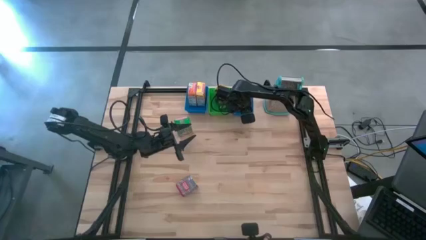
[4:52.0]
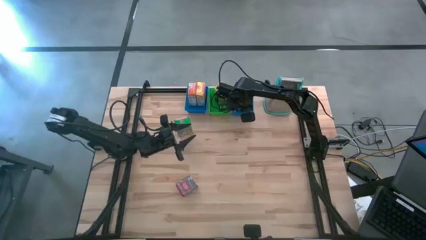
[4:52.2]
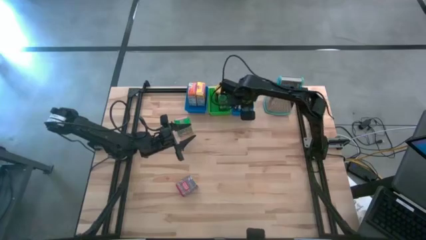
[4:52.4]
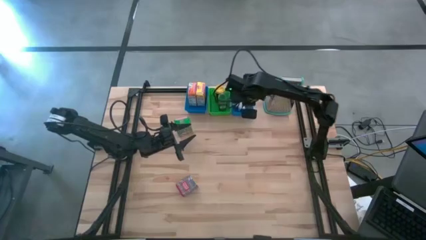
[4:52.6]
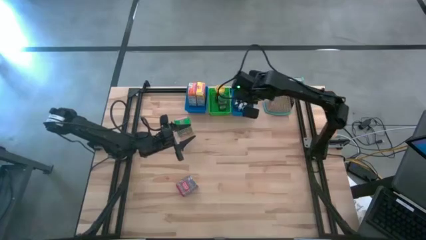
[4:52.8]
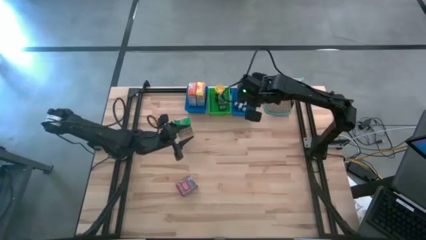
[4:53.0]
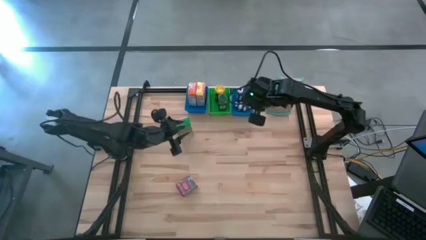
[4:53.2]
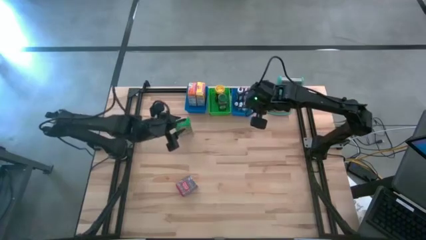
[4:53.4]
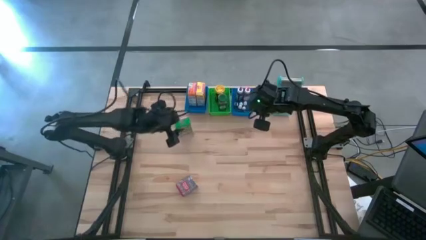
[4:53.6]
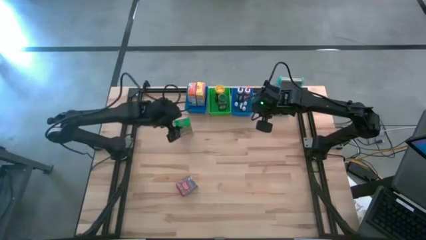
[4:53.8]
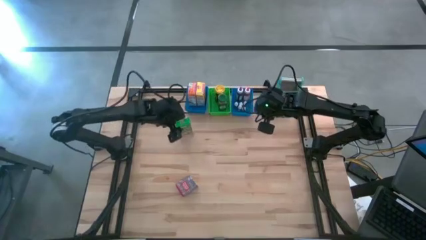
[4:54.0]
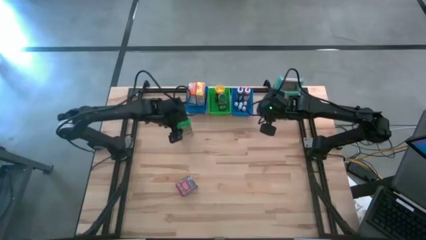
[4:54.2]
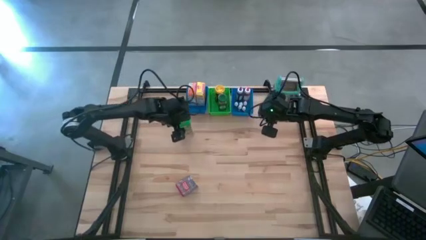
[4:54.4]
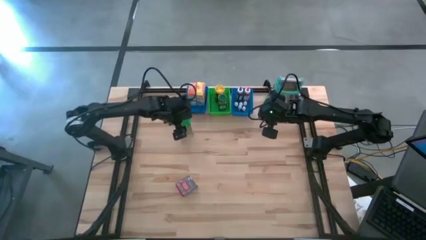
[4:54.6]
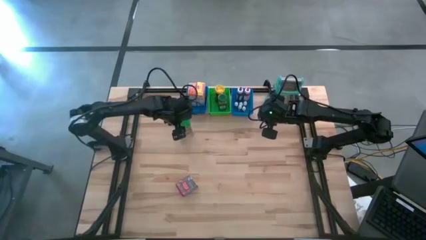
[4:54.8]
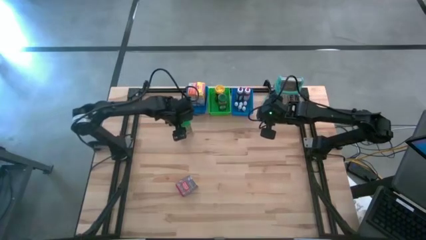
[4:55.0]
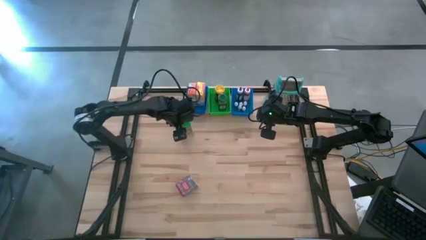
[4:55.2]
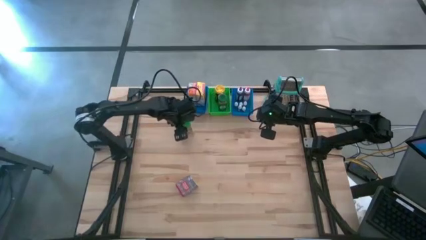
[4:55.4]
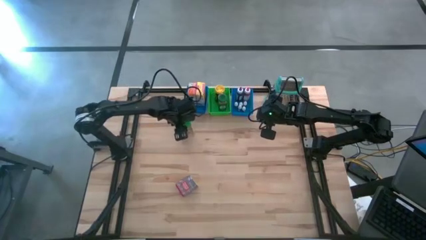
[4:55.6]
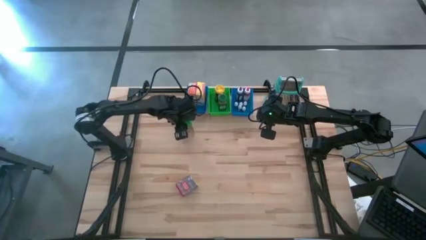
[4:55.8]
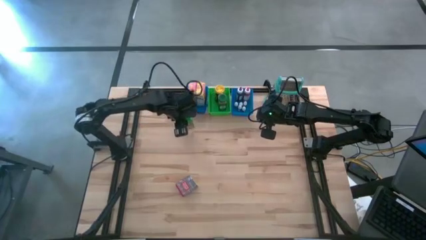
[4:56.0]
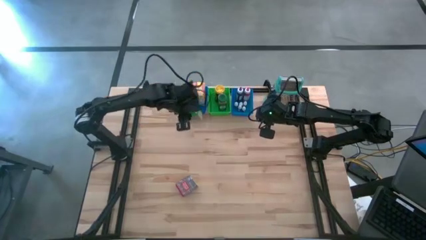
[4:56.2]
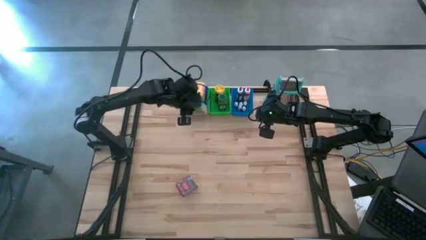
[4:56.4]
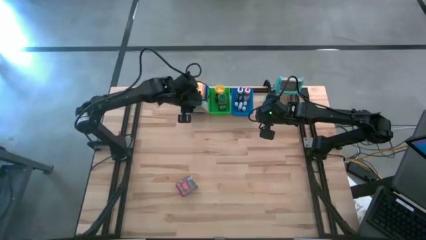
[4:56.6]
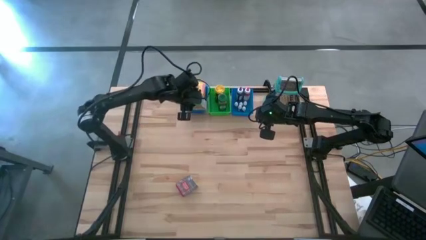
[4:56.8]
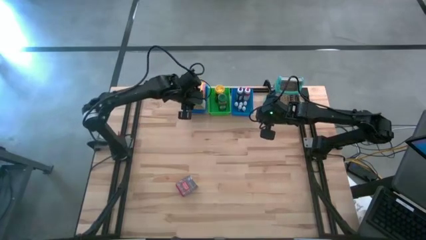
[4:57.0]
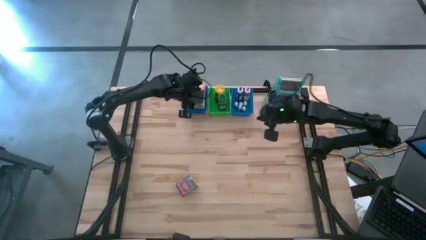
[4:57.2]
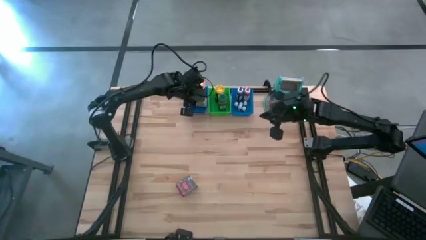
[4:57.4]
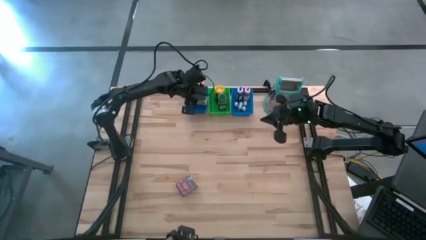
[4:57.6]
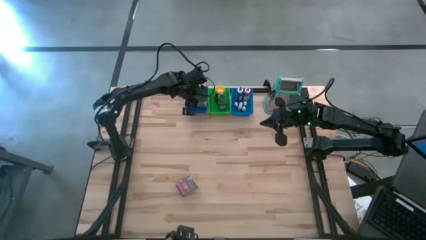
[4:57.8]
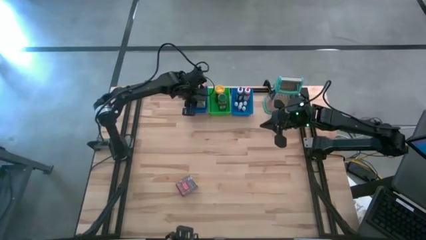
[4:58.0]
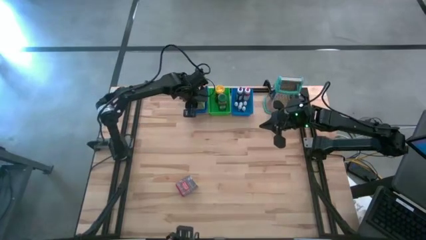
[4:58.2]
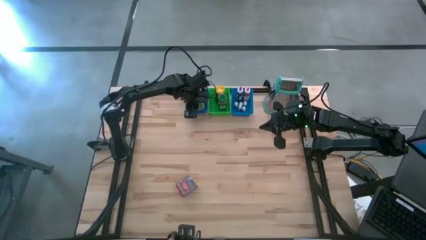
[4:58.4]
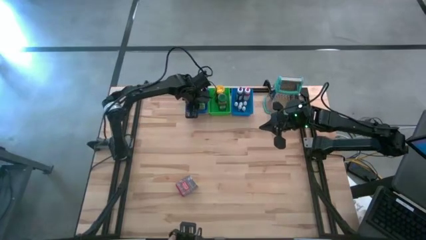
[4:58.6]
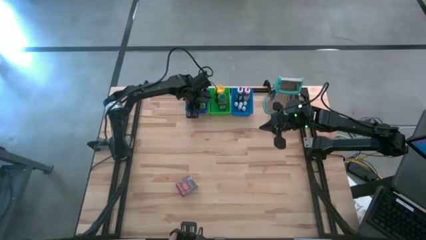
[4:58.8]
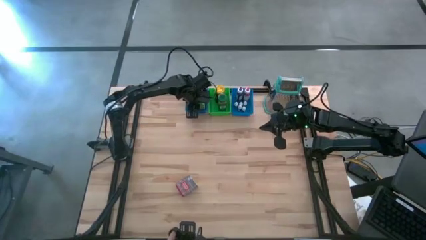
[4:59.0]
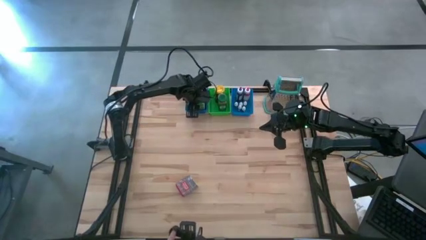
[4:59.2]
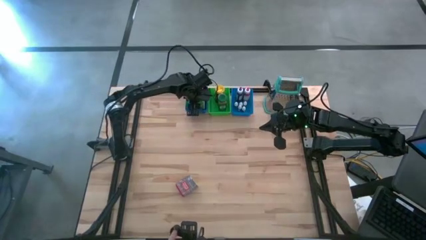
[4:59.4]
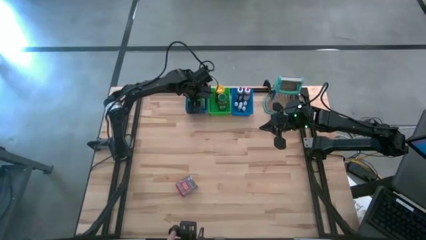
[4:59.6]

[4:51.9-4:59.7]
Task: Pick & Place Kitchen Items
Put the green cereal box into the left blue bin

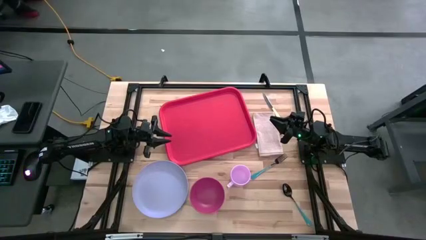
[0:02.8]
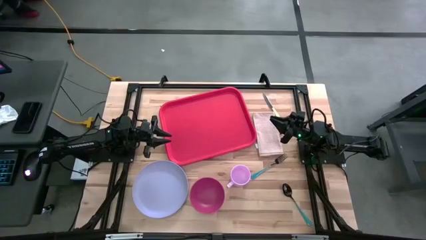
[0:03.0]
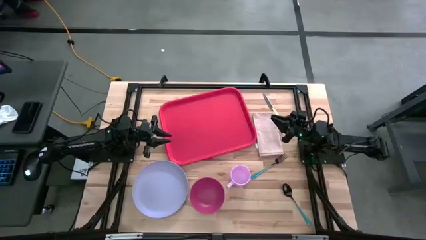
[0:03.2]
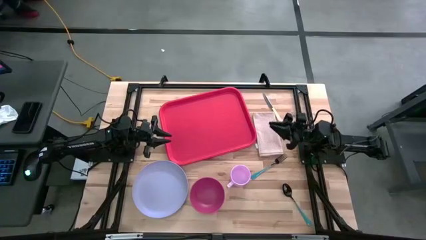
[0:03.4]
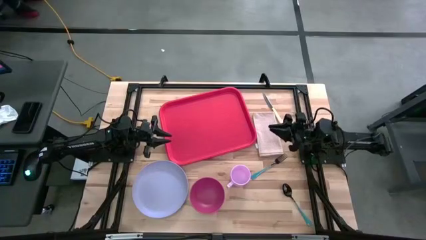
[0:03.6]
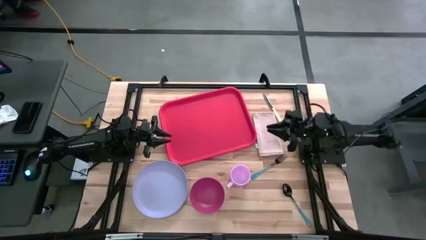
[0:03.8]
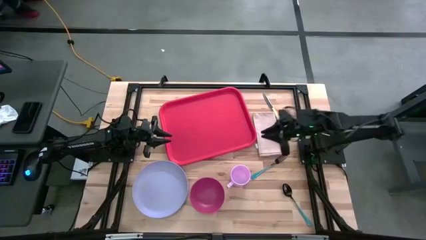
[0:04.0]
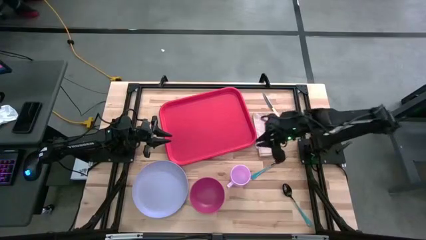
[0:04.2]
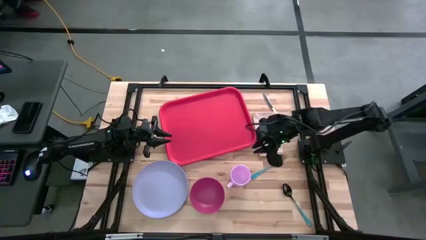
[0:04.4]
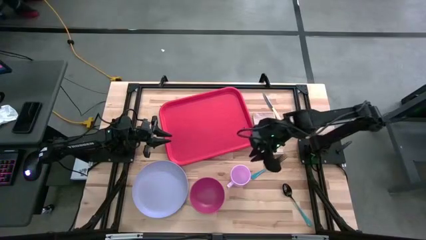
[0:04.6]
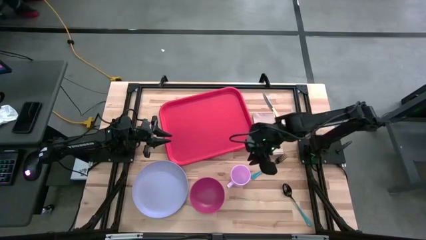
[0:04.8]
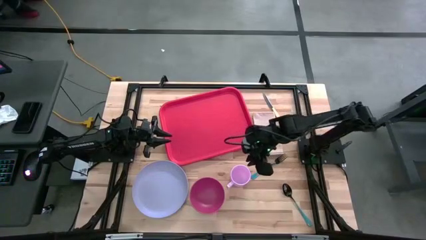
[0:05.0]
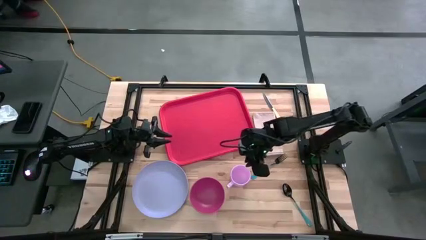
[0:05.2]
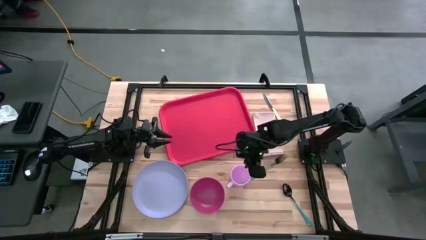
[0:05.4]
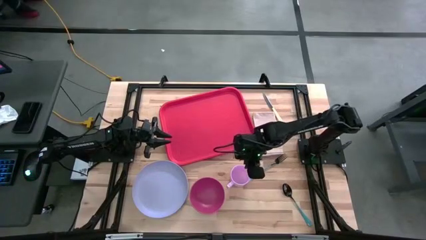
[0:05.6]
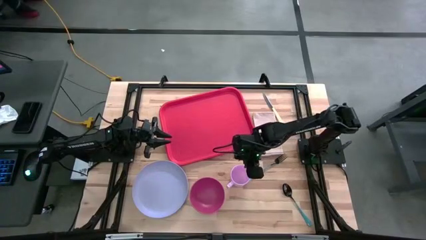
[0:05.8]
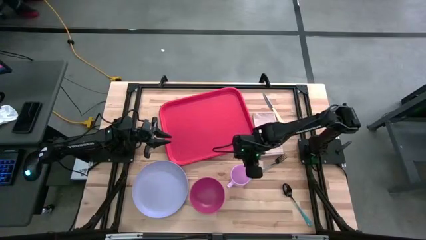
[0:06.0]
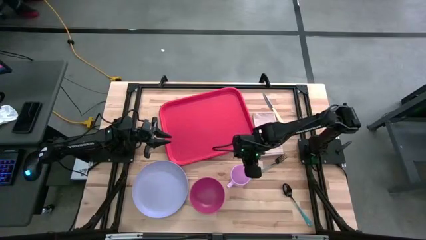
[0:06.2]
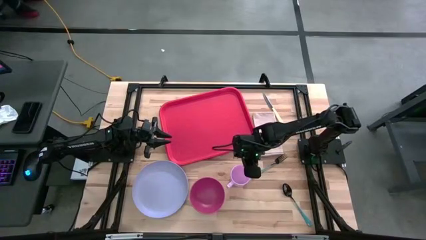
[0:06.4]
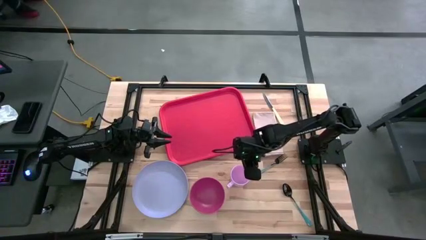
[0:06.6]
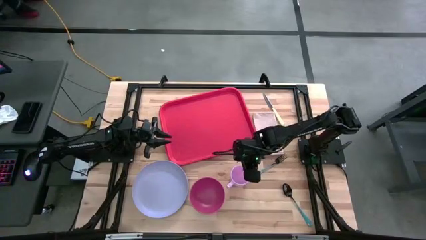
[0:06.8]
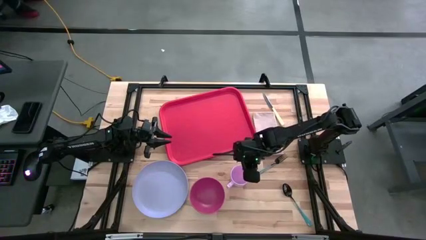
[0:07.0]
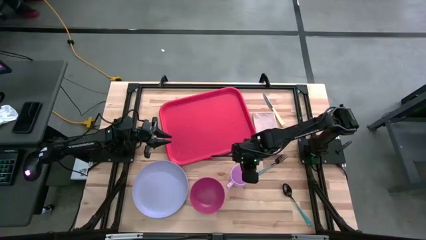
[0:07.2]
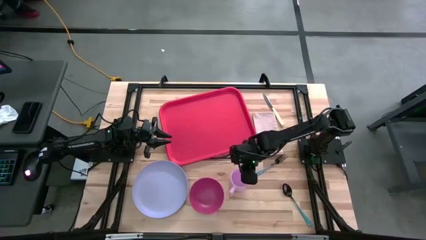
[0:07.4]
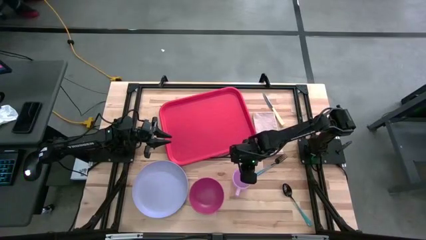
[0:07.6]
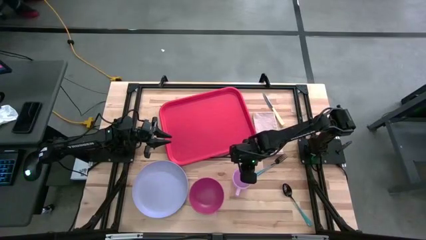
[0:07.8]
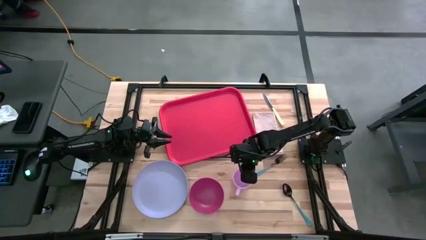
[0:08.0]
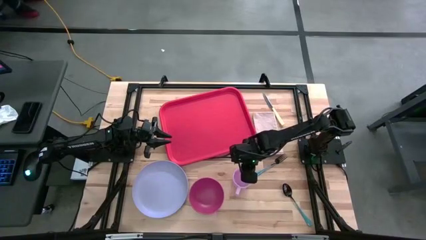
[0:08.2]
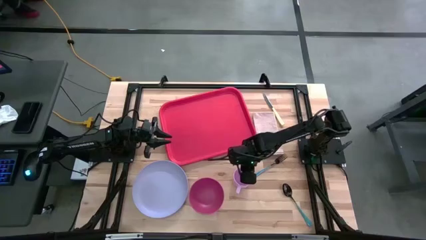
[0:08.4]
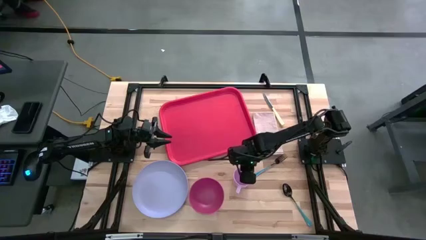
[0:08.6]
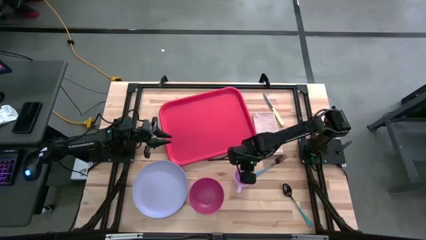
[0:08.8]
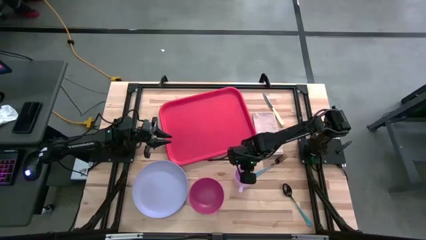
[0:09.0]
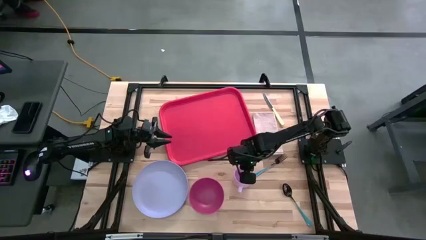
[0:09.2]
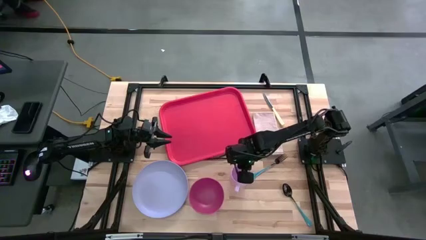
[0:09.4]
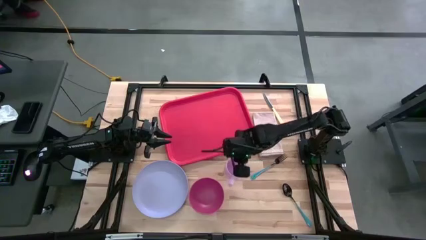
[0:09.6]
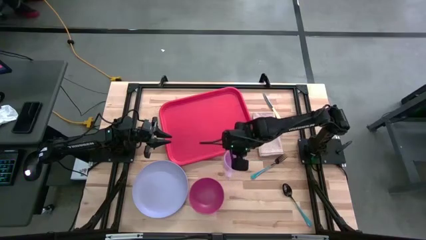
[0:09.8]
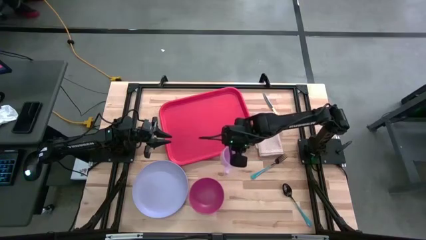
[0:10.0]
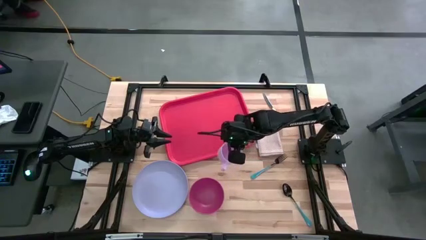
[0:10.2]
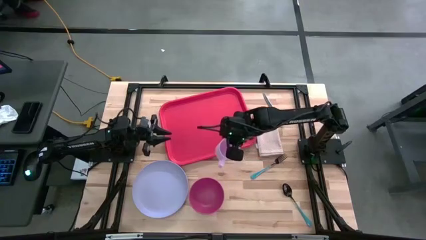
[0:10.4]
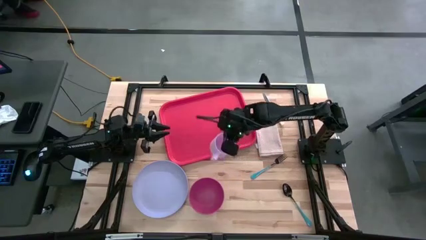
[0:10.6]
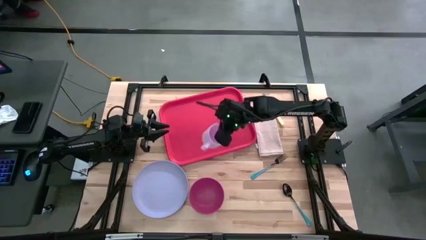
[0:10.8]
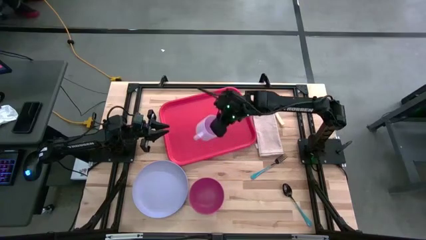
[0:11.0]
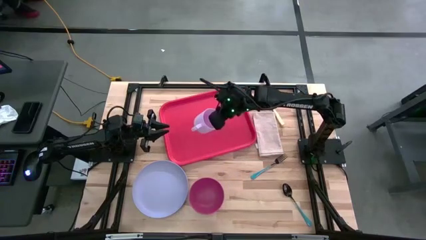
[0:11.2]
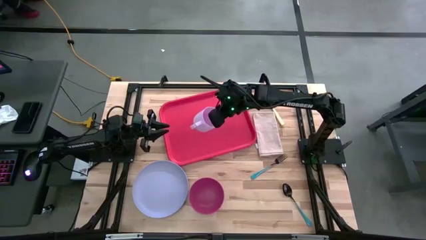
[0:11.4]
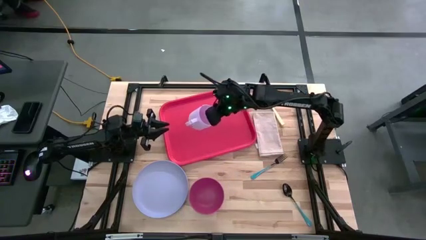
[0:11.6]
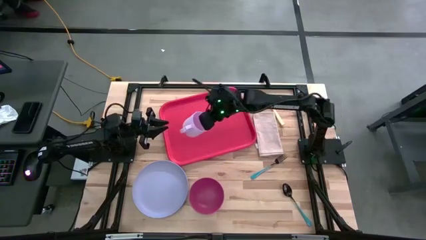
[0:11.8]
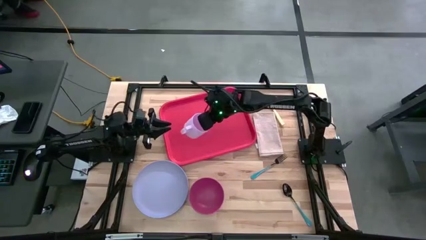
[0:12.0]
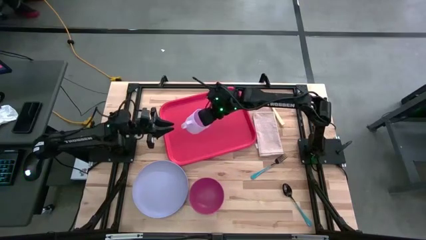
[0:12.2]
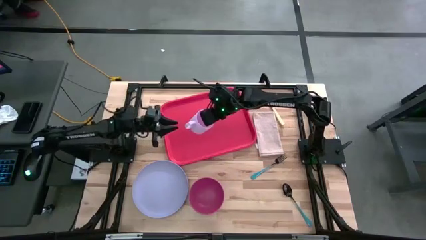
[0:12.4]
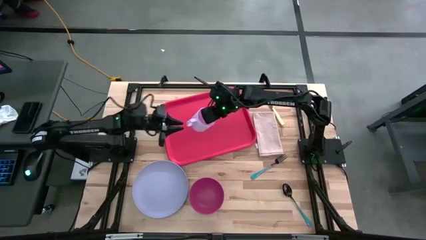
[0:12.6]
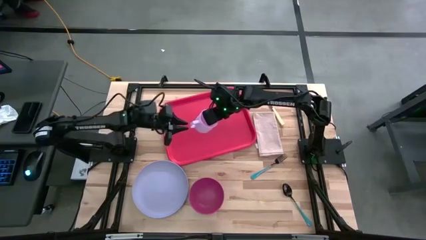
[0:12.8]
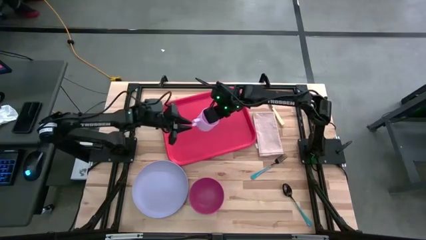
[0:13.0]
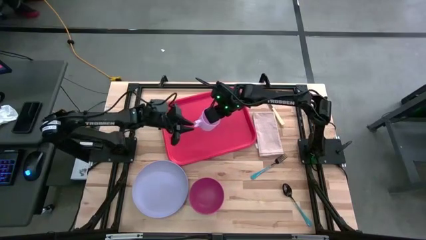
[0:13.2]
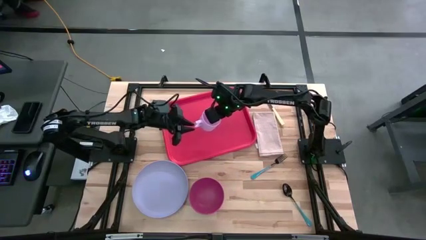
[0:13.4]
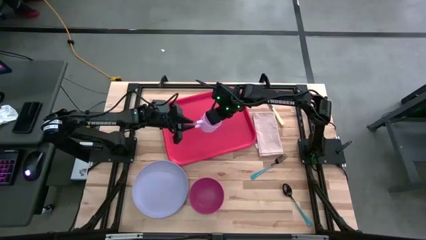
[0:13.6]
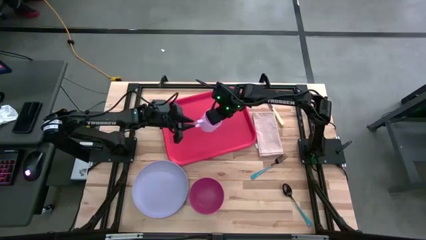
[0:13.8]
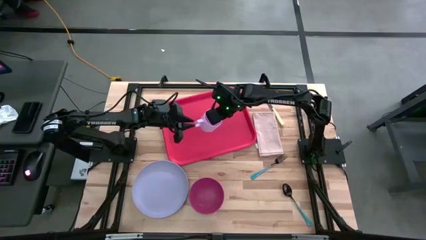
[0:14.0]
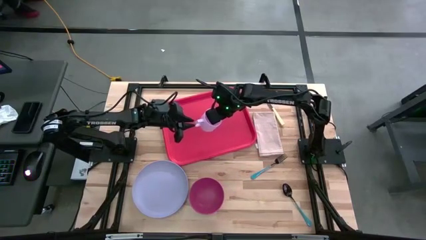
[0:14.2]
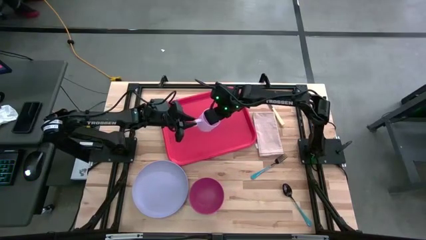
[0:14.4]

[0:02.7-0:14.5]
Task: Set up tray
Put the light pink mug at the top left of the red tray
